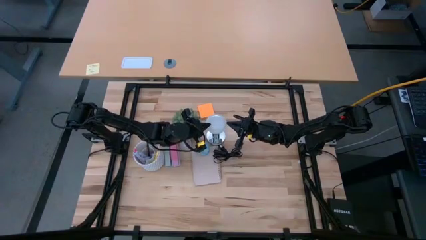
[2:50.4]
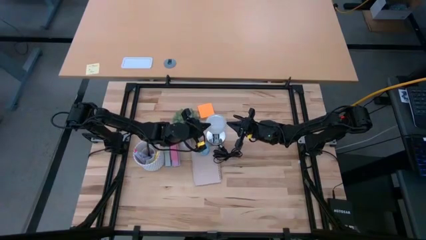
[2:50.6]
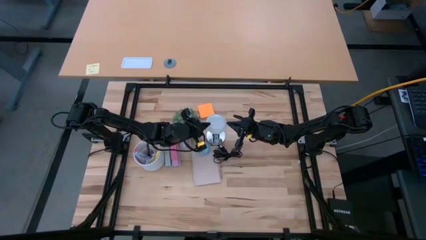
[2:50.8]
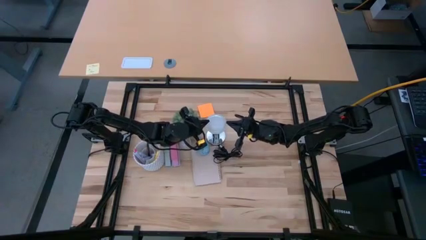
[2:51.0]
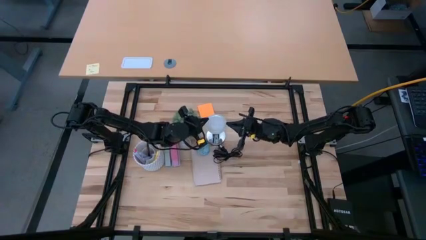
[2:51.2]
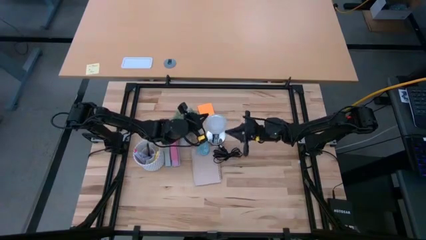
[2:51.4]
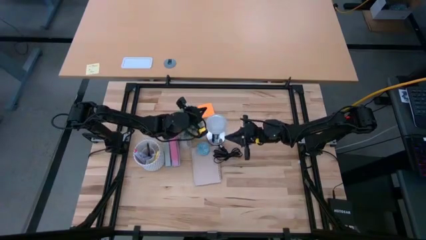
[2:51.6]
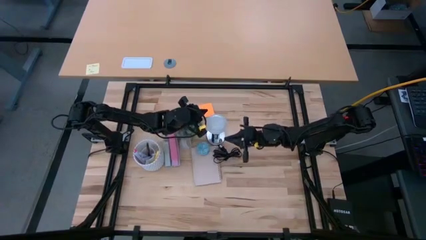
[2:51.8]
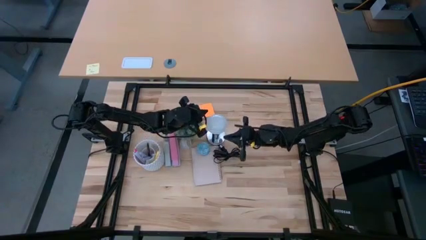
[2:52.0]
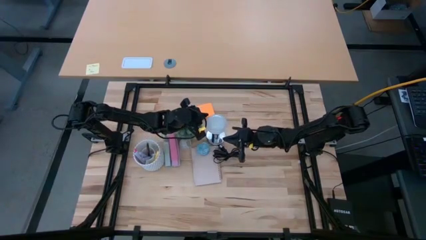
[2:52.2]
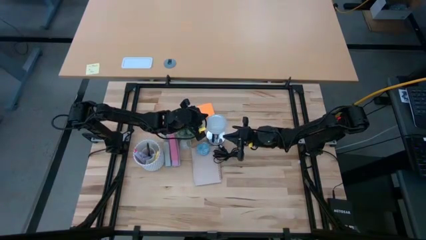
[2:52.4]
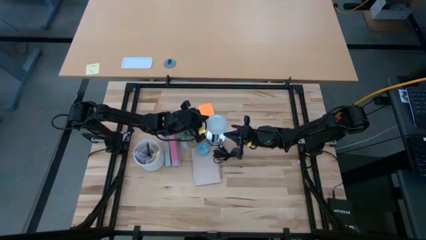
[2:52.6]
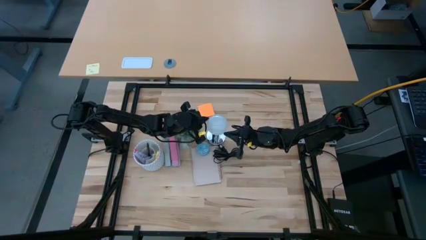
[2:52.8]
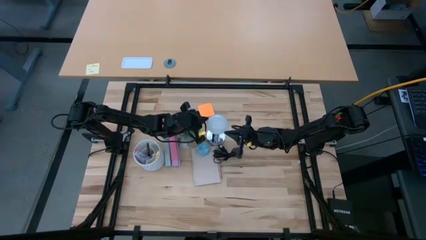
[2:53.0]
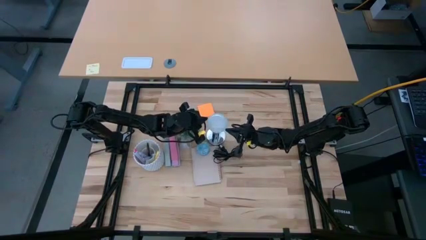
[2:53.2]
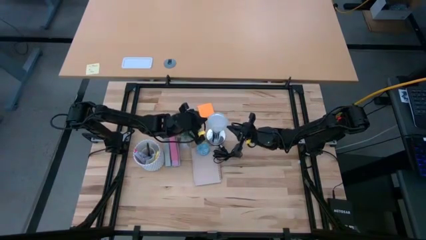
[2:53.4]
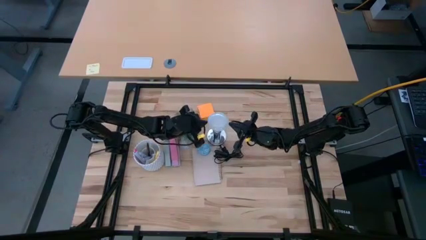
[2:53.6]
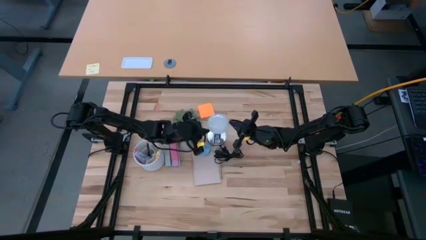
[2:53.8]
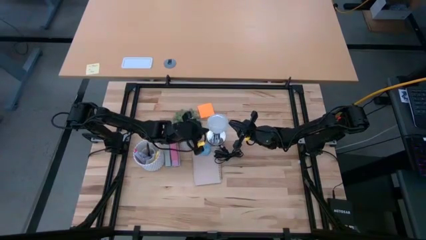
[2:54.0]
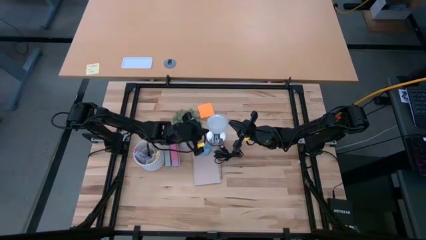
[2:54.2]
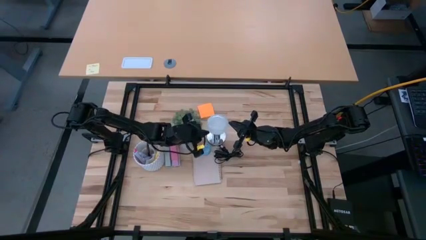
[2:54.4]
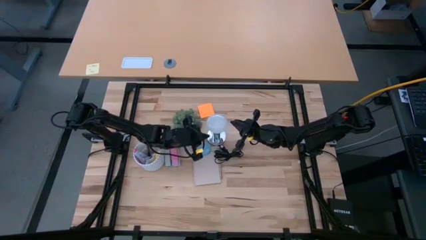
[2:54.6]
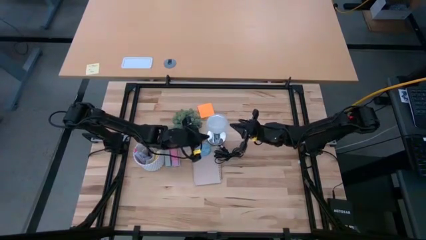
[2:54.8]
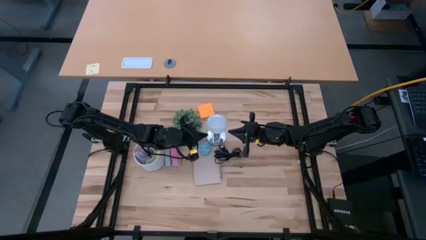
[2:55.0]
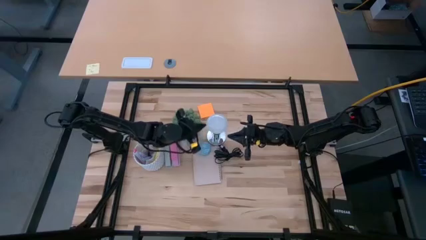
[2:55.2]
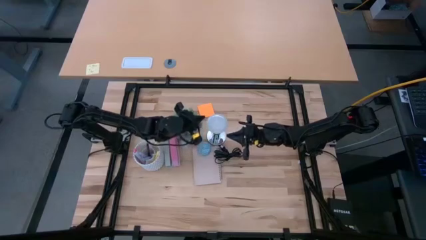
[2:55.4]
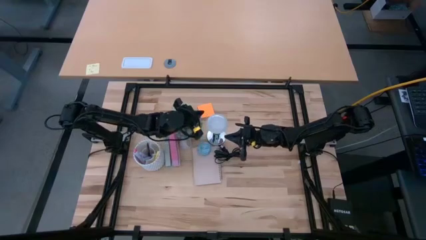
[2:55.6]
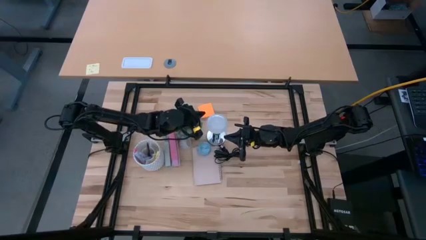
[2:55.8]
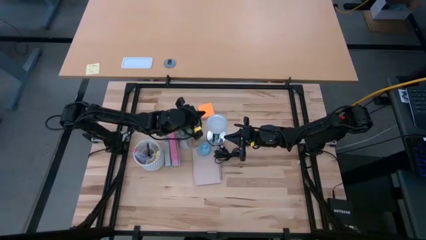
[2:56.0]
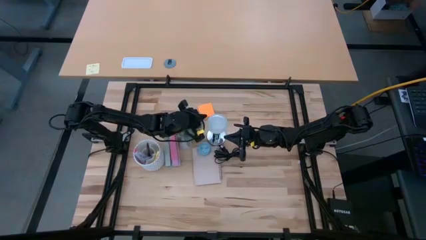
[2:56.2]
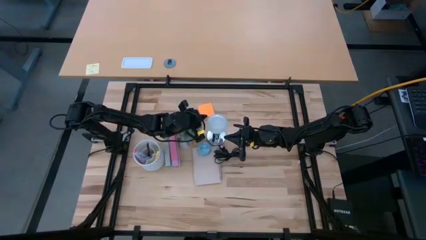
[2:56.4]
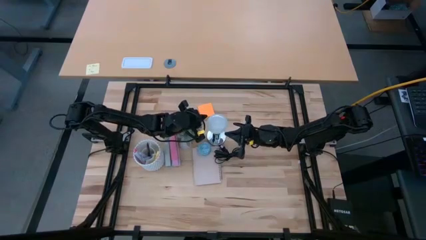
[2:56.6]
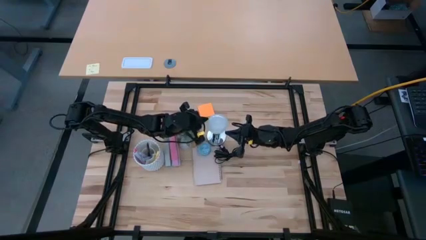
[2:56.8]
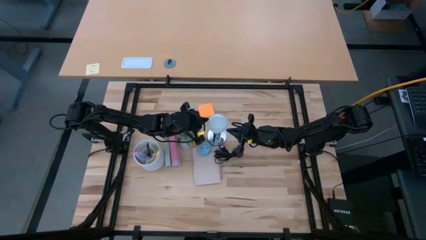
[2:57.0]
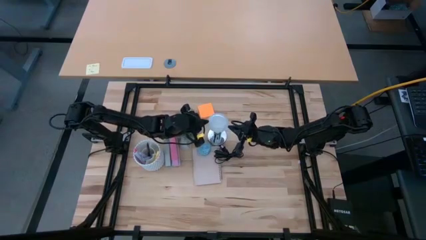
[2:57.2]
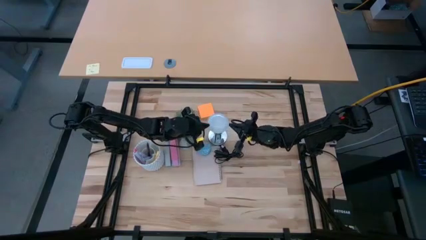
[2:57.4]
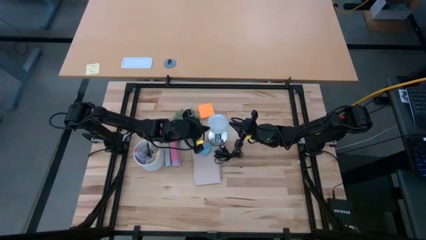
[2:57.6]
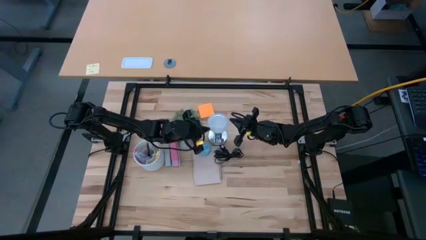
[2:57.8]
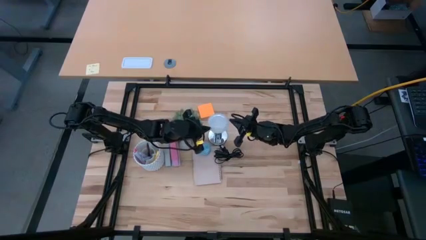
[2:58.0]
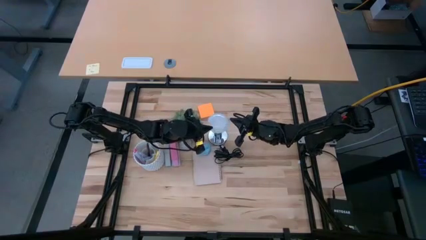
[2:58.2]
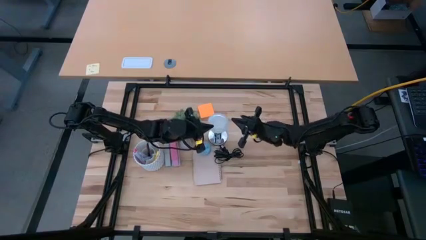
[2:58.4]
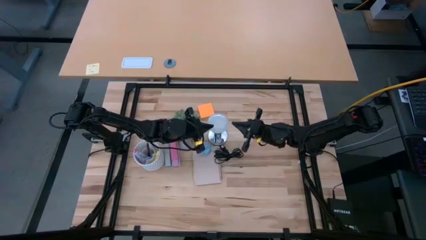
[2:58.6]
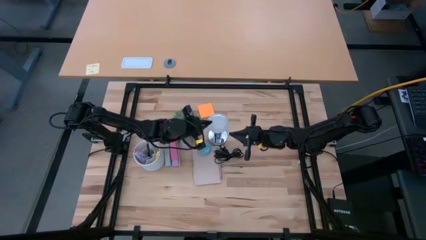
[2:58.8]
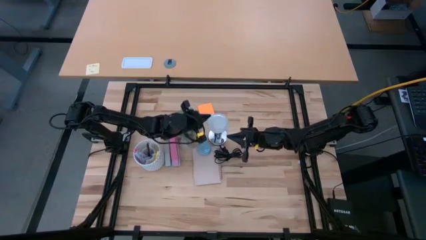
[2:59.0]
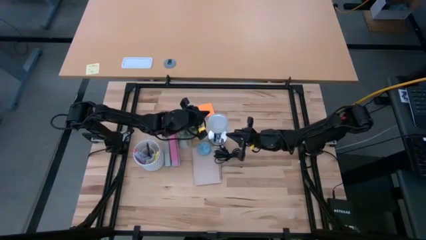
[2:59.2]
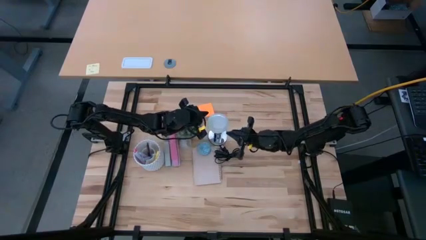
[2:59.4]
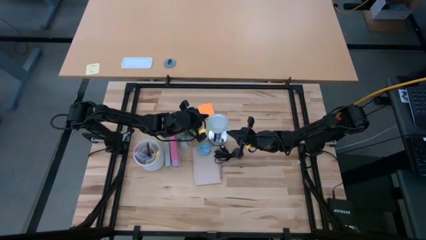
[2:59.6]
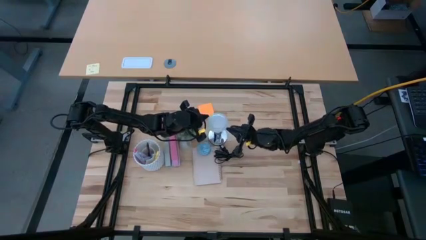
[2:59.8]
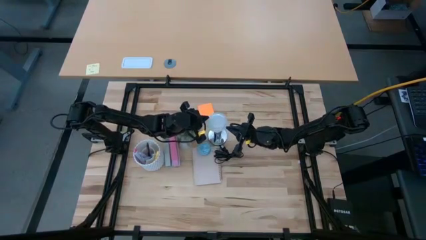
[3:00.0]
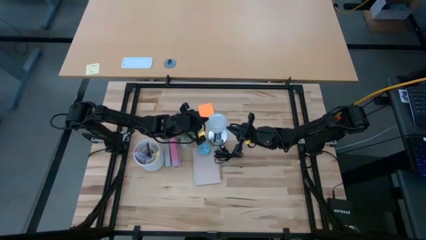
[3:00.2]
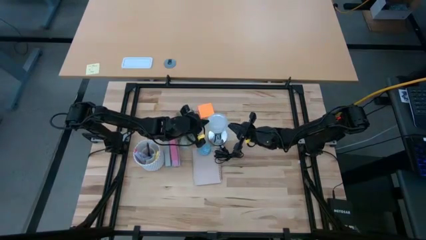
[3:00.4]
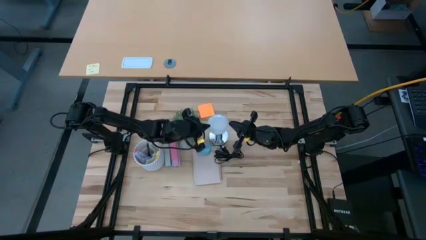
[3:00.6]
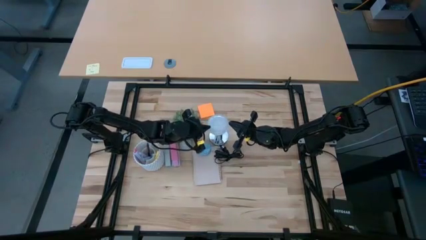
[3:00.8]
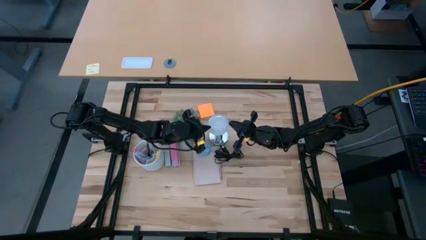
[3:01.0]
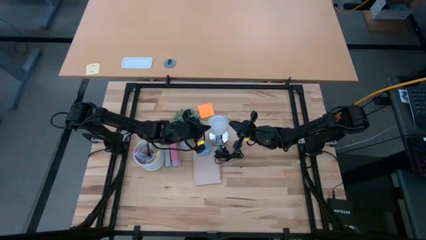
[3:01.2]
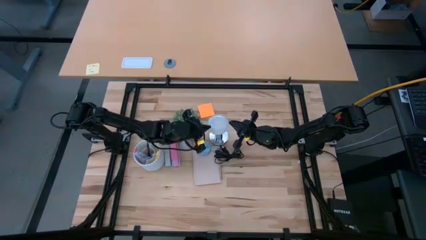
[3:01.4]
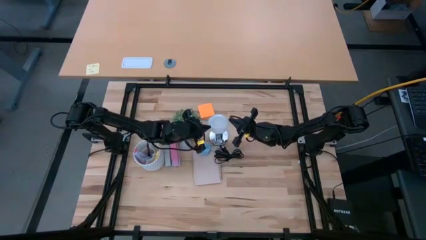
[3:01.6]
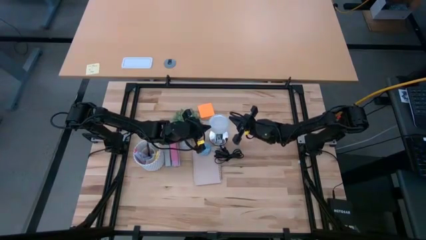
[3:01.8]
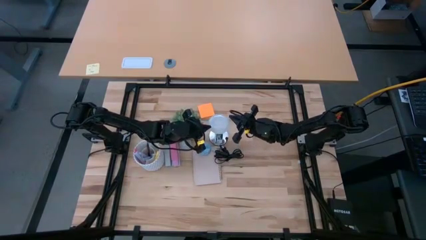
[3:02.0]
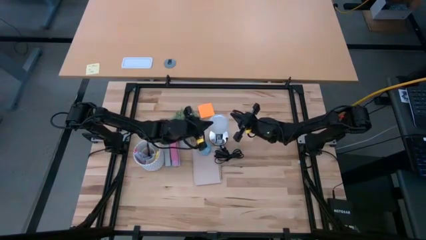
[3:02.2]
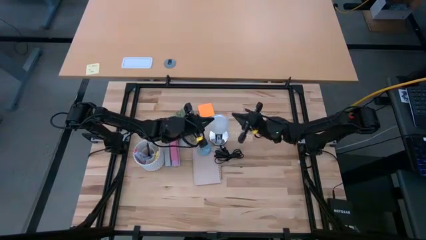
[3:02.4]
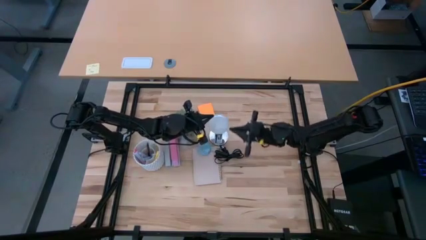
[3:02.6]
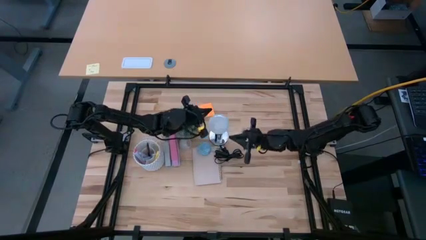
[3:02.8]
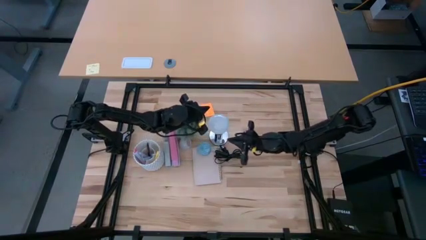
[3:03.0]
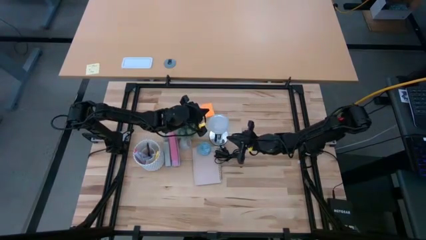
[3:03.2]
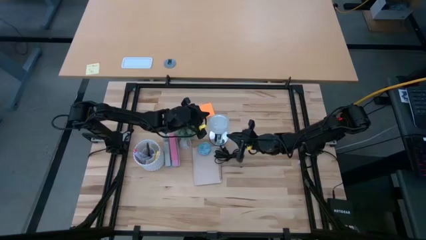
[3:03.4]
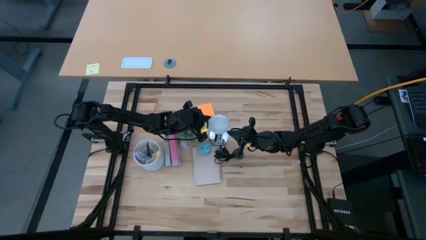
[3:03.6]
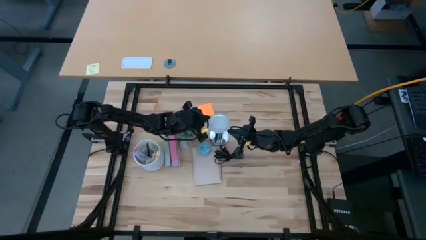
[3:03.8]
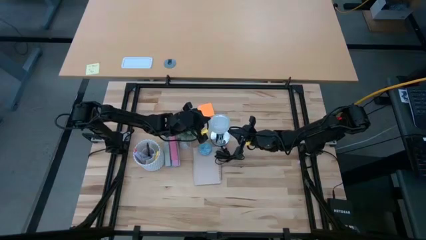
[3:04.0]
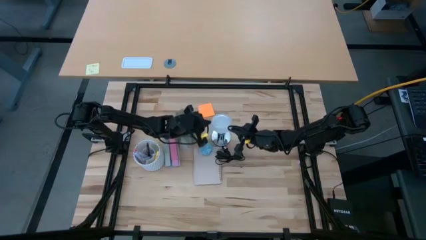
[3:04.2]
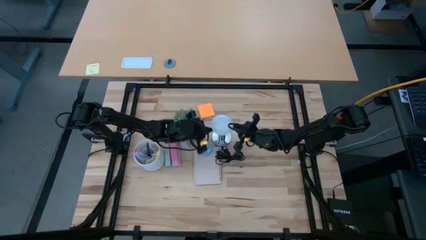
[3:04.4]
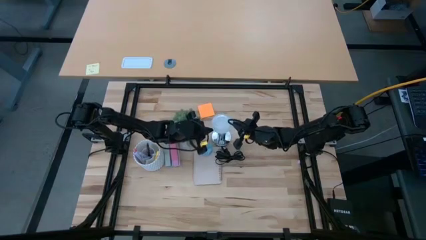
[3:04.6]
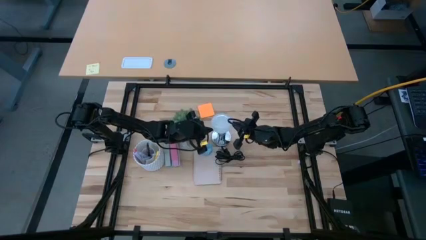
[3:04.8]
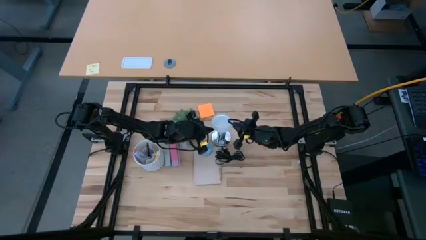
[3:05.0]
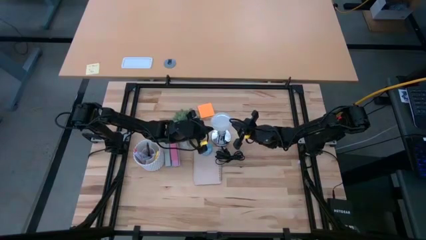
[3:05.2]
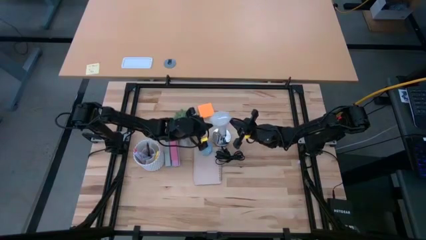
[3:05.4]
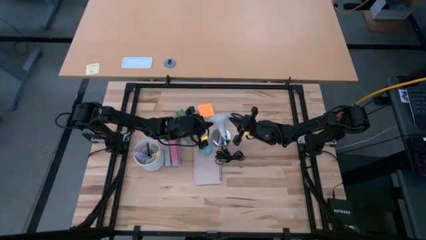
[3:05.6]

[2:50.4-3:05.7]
Task: Screw lightbulb
Remove the lightbulb from the silver lamp socket
